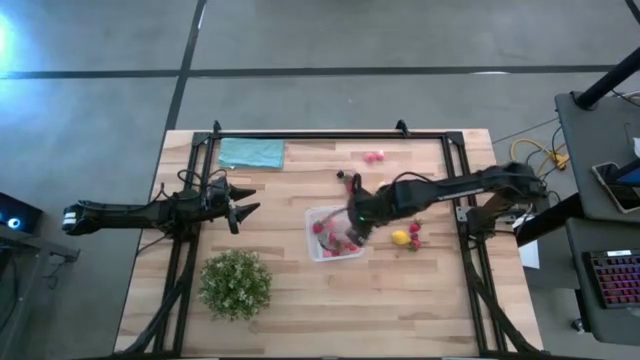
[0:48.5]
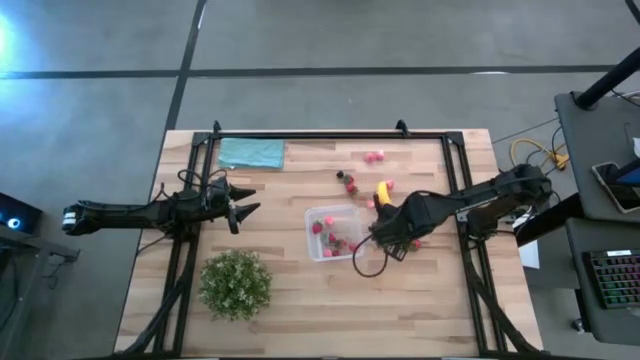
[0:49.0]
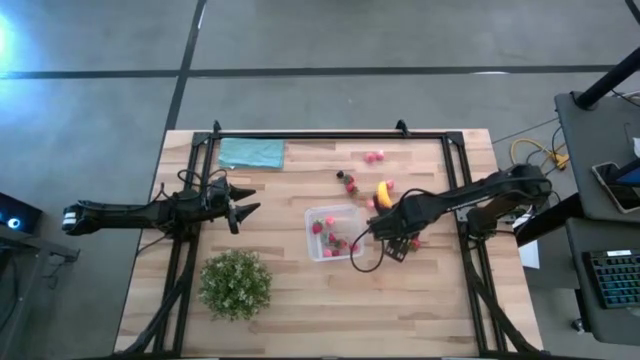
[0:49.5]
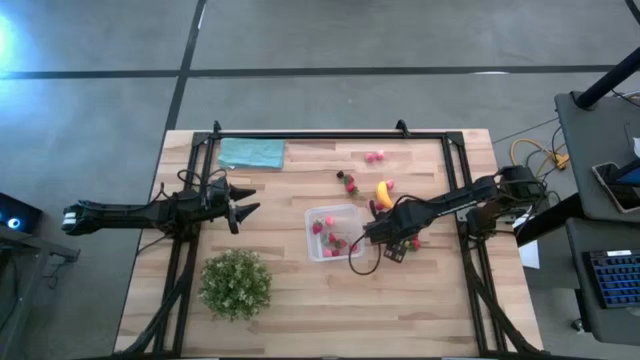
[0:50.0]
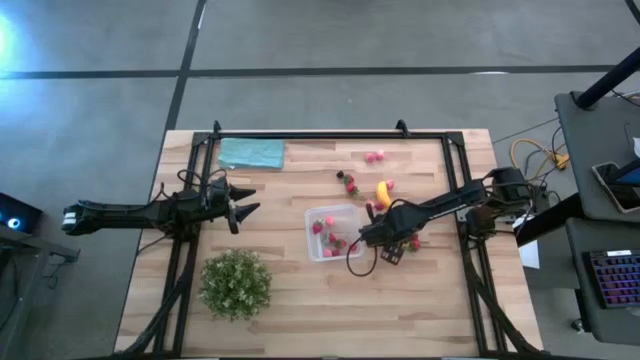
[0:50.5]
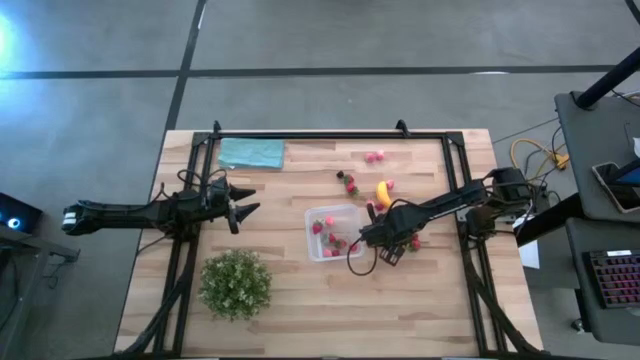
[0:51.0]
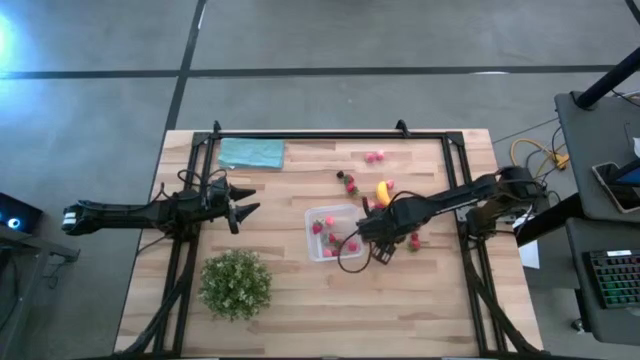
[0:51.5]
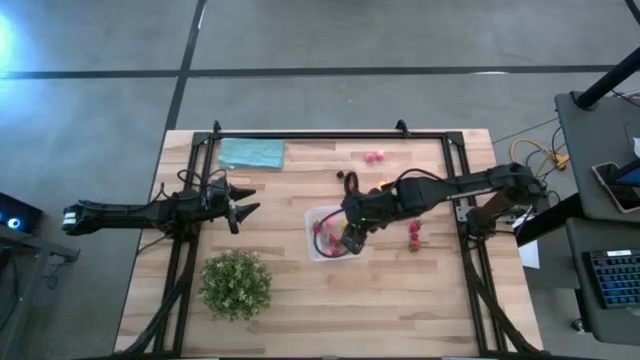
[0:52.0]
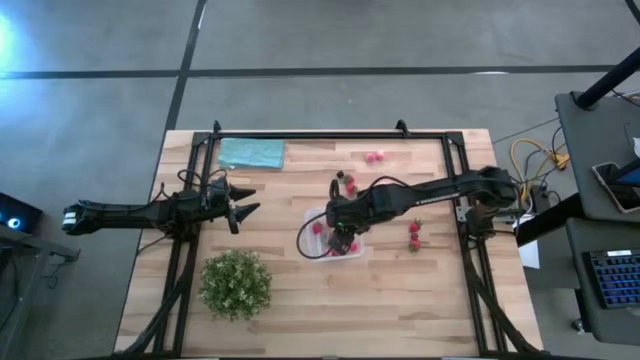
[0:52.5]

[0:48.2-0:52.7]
Task: Pick and placing Produce into tupperware
Put the lemon into the transparent container

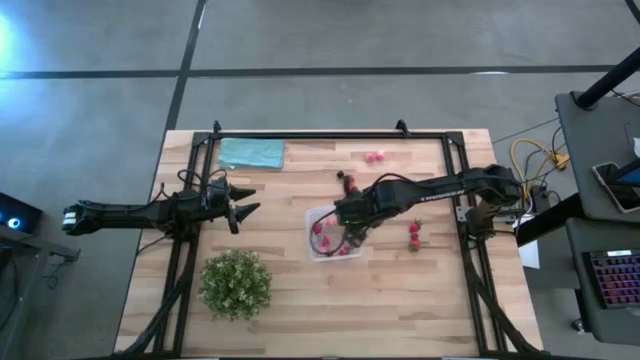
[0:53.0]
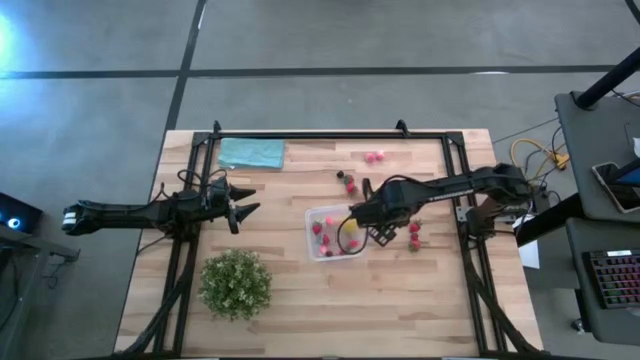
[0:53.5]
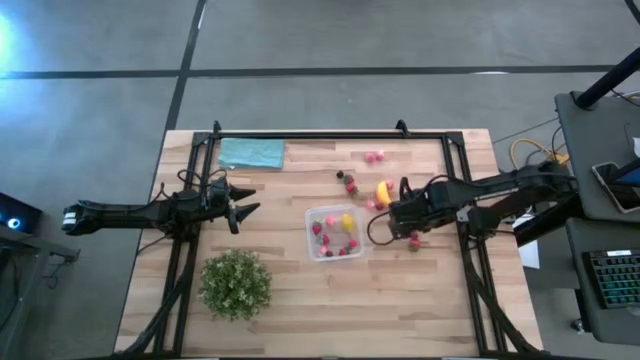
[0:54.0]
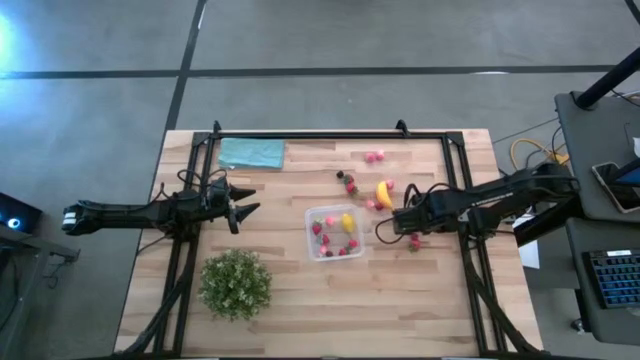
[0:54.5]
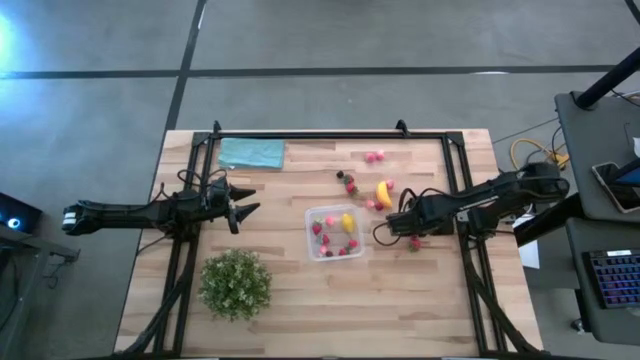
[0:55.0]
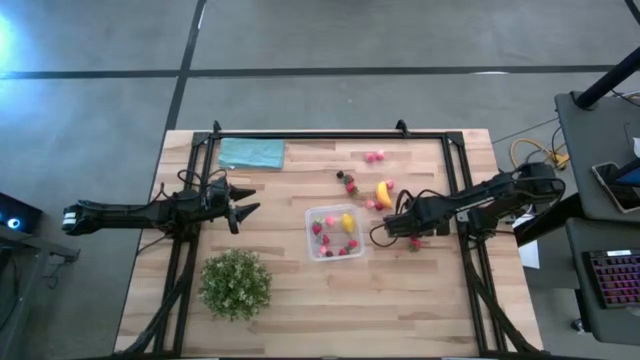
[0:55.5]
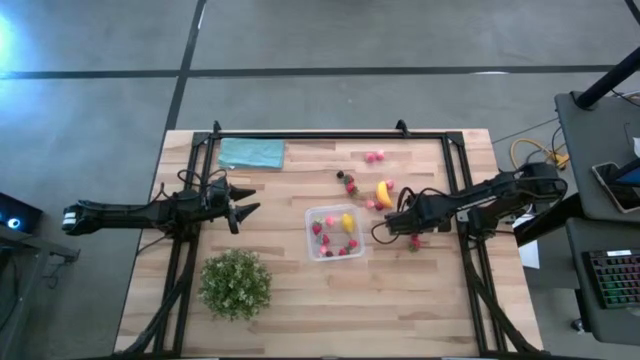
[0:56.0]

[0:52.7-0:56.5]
Put the strawberry into the transparent container

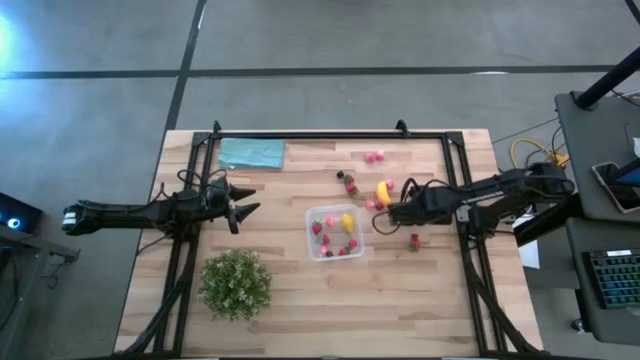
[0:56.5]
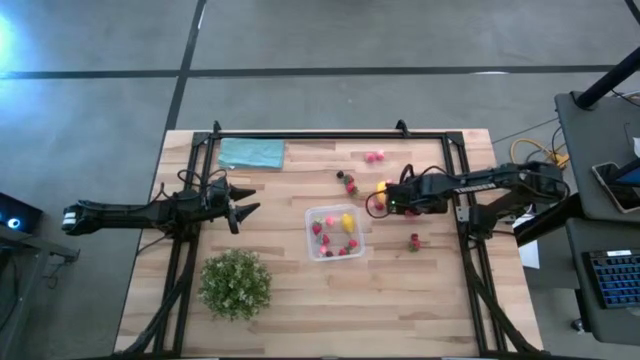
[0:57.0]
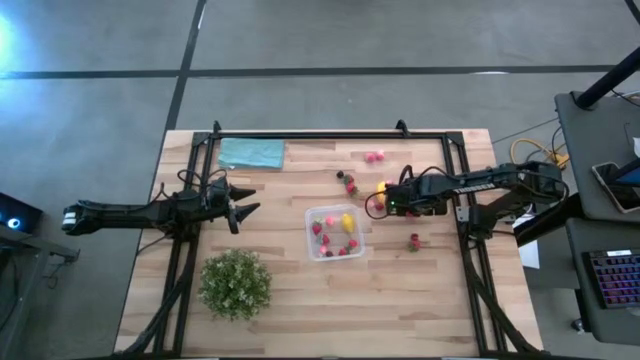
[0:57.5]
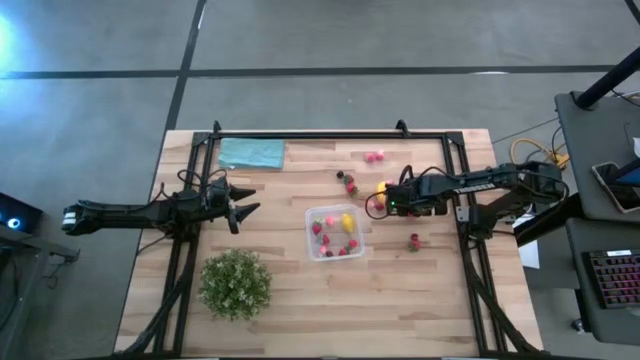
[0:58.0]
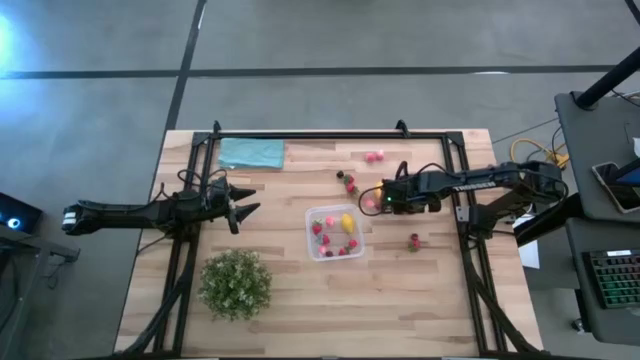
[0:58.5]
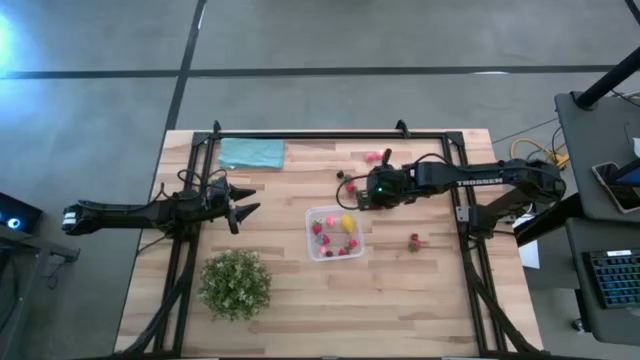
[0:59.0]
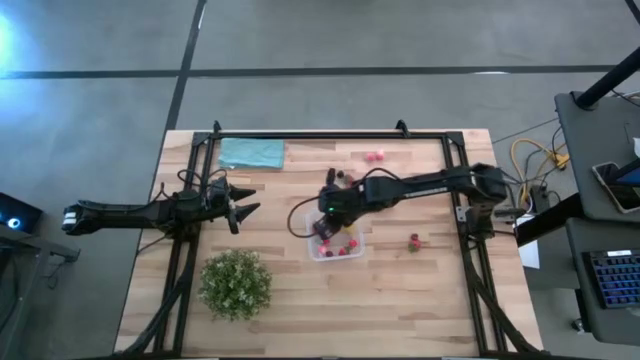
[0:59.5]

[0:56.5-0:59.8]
Put the strawberry into the transparent container

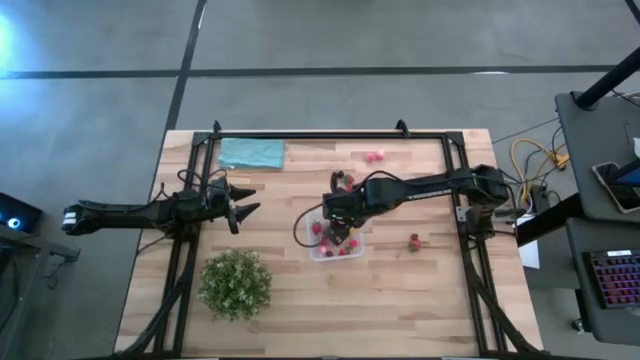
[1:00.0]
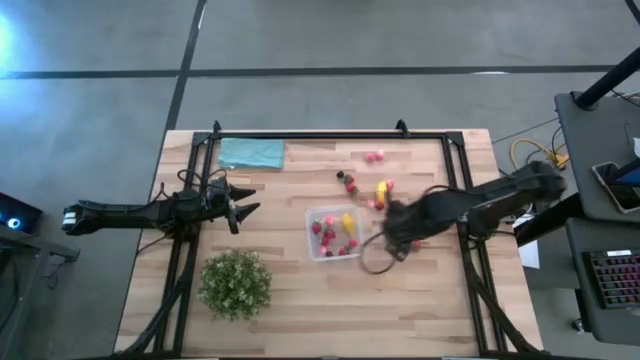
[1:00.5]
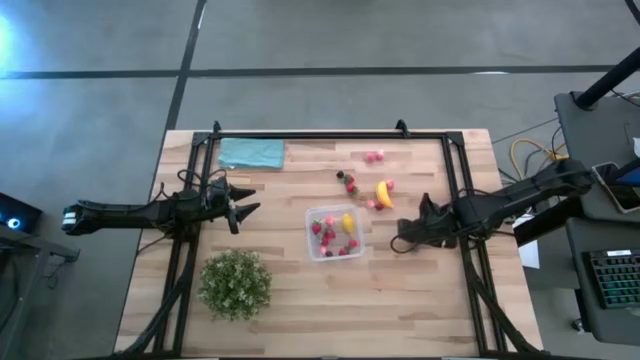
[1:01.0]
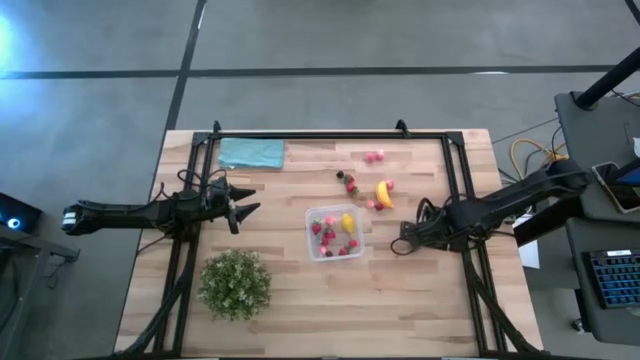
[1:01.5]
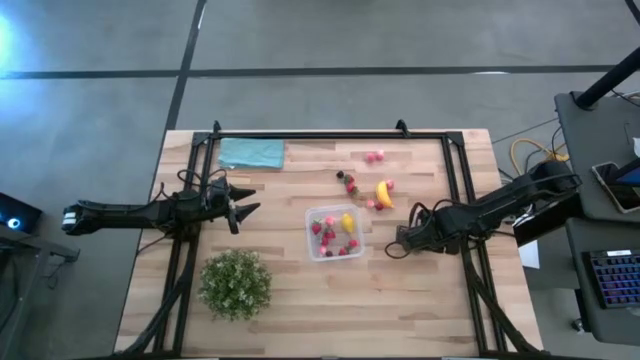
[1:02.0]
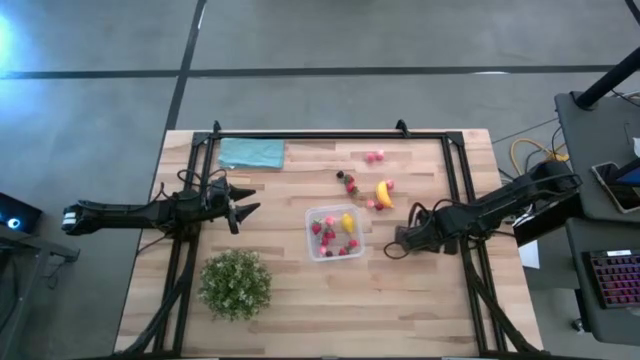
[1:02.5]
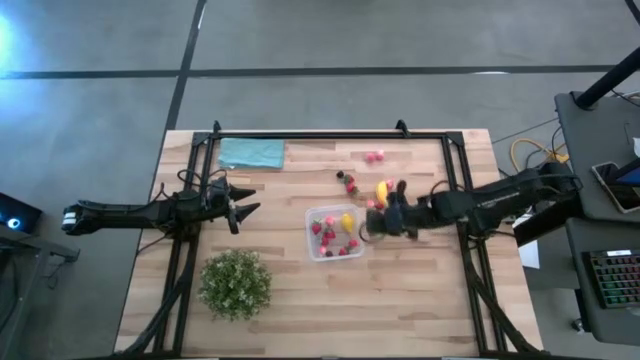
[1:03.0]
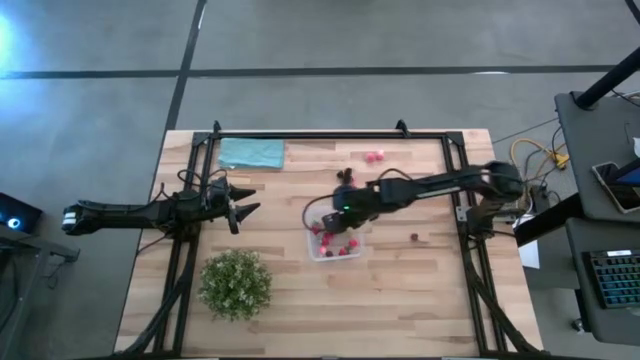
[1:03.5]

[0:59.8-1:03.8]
Put the strawberry into the transparent container

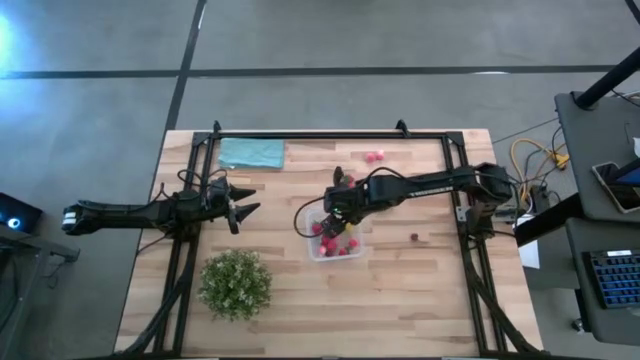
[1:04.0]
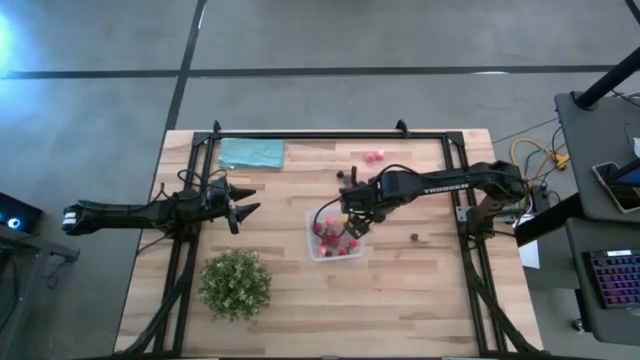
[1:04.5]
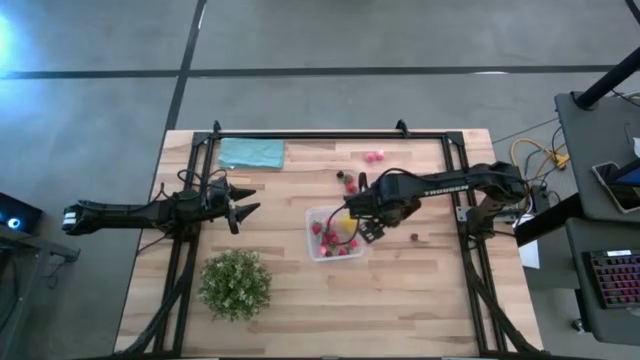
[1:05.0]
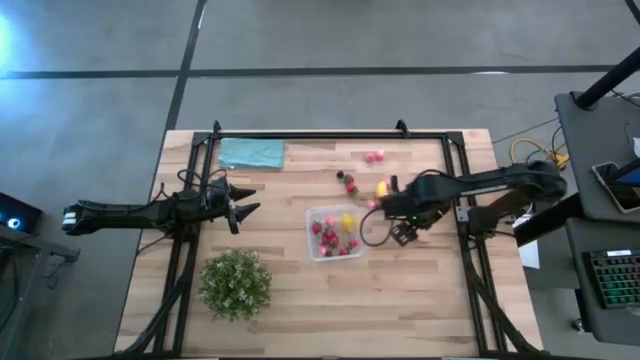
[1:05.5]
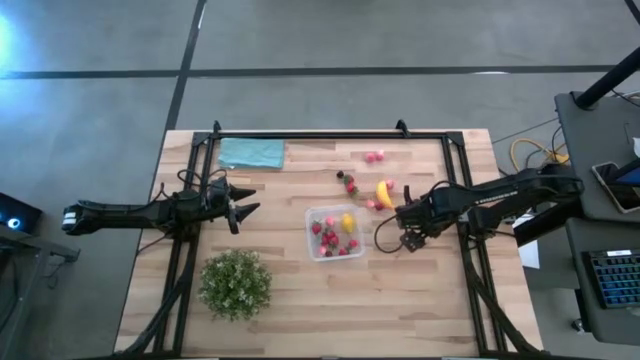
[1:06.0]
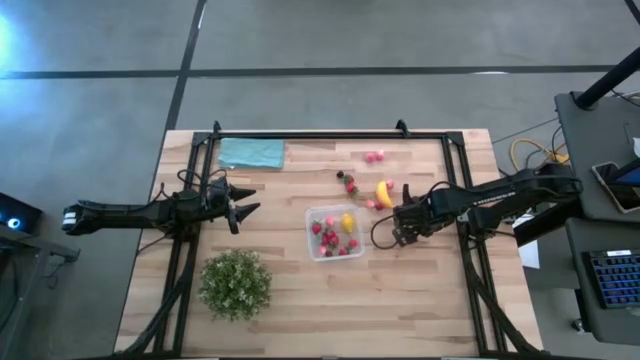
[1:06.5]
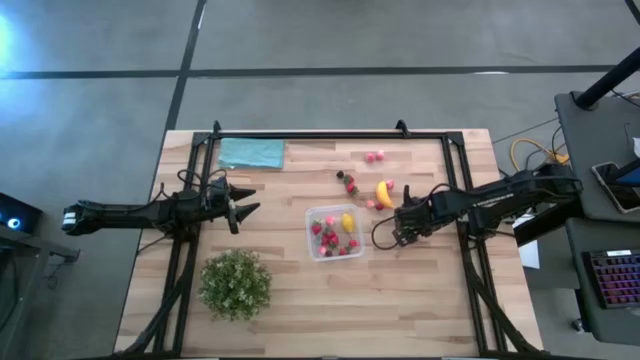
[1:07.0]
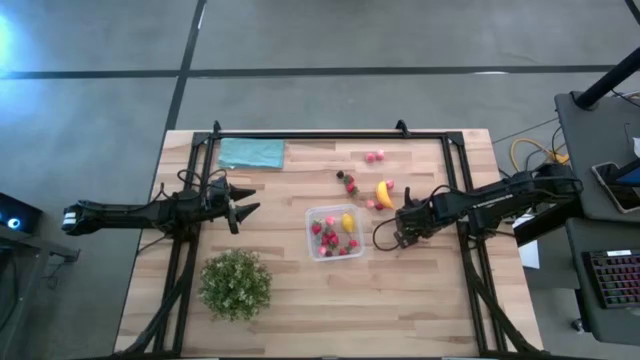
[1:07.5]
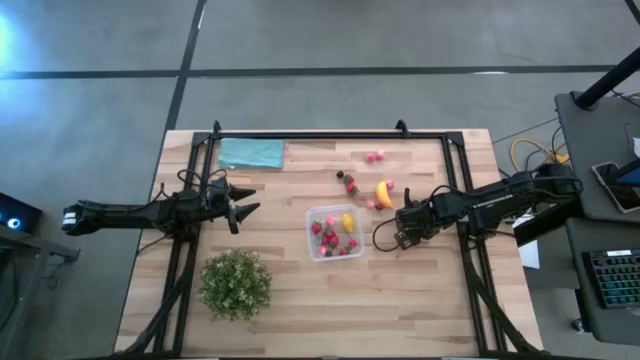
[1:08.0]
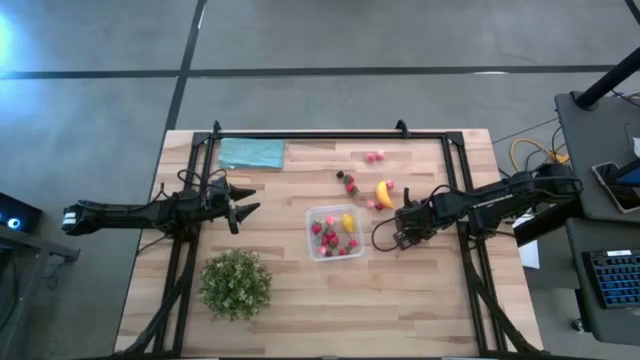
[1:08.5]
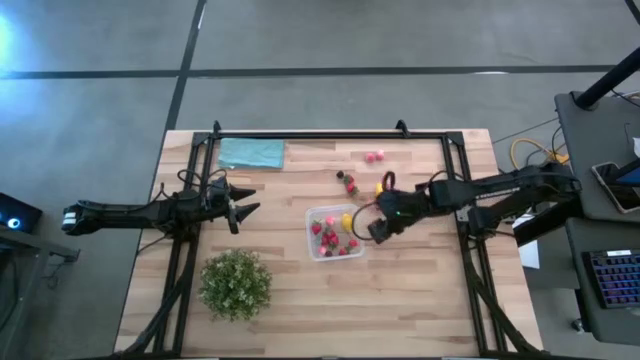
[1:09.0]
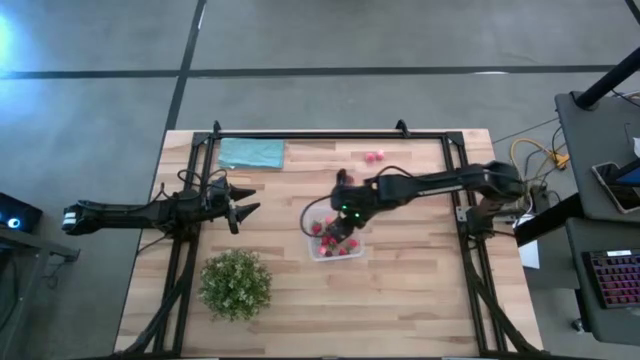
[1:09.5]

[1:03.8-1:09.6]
Put the cherry into the transparent container
